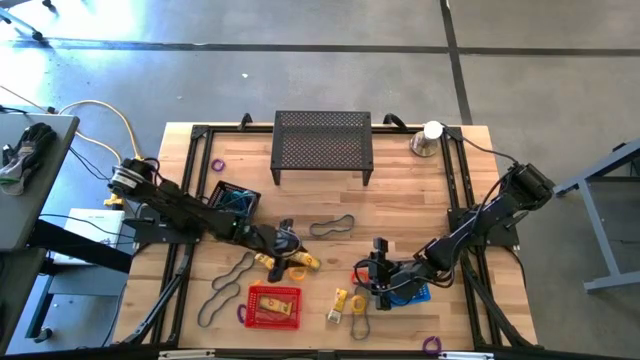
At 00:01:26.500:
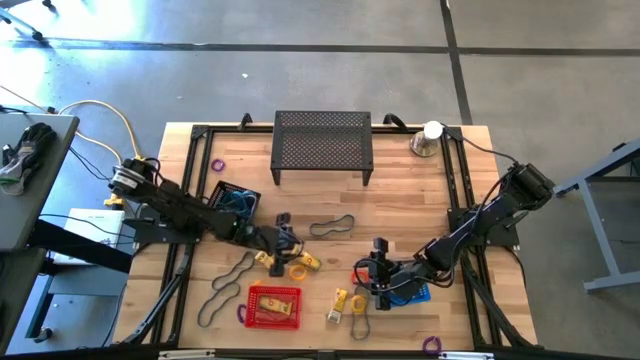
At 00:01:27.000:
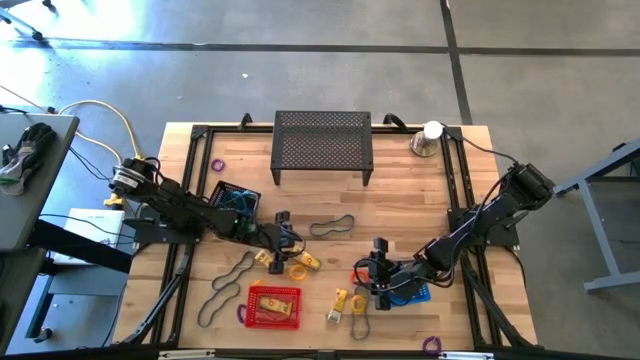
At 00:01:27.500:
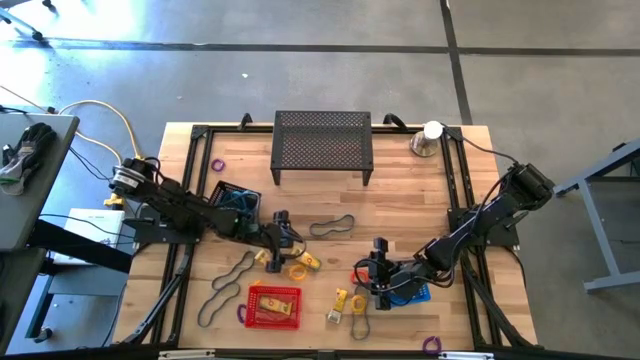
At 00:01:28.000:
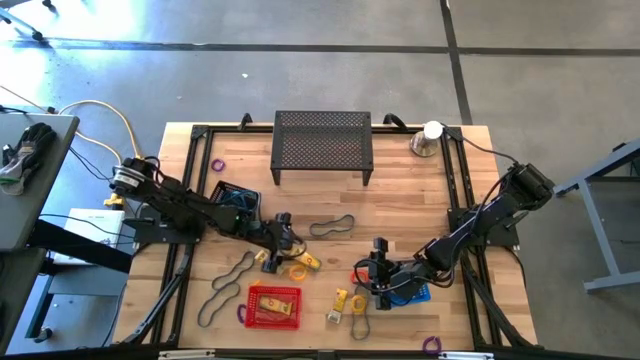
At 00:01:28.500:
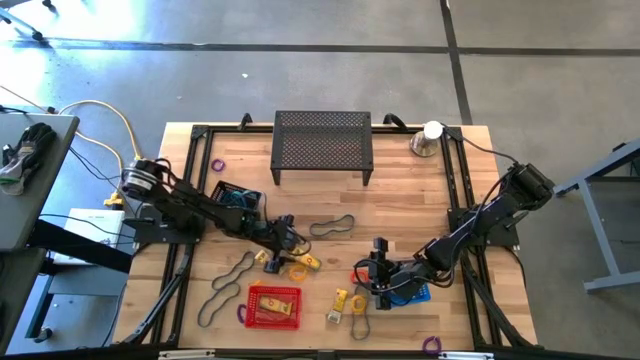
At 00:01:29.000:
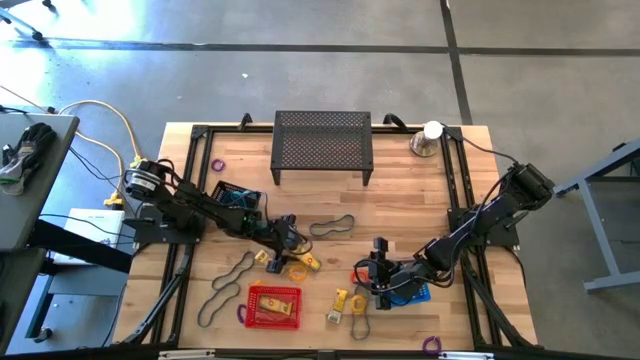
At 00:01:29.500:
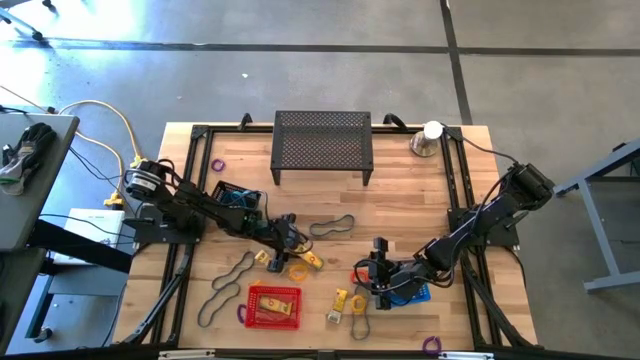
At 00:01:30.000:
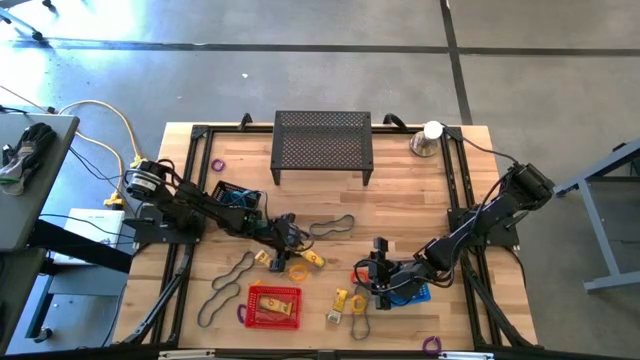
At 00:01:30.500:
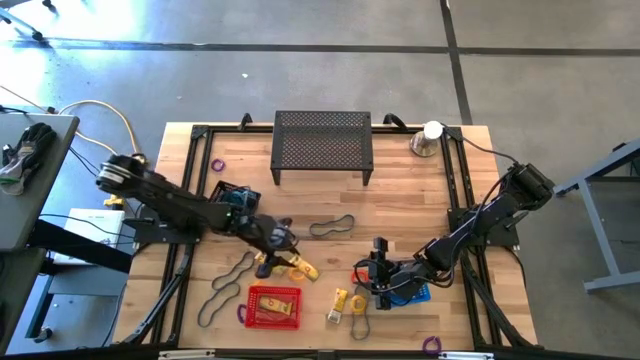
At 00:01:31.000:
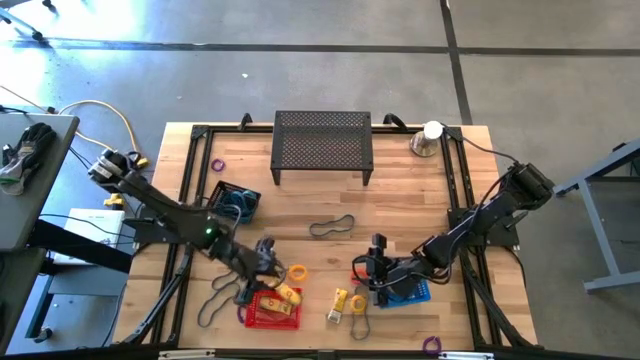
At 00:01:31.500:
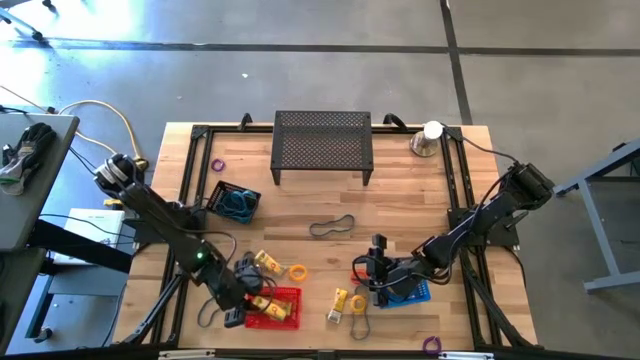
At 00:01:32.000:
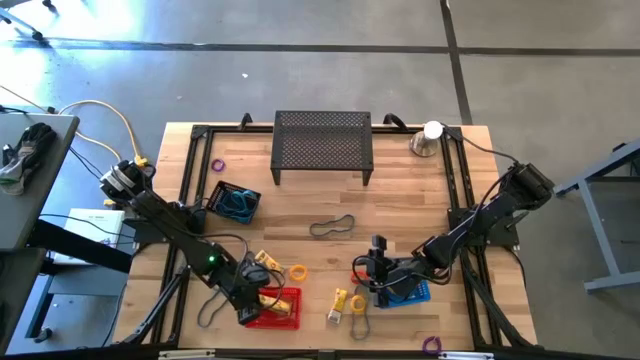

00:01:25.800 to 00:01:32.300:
Task: Pick & Place Office Desk Supplies
Put the yellow crayon box into the red bin

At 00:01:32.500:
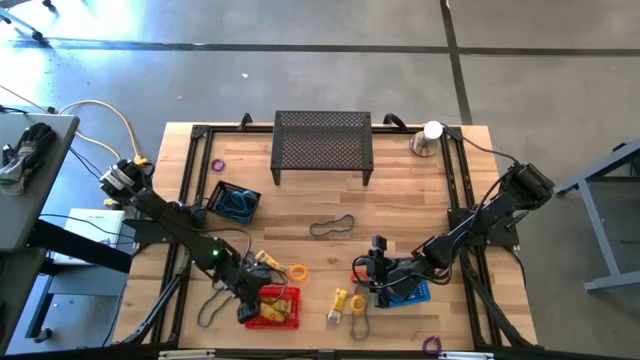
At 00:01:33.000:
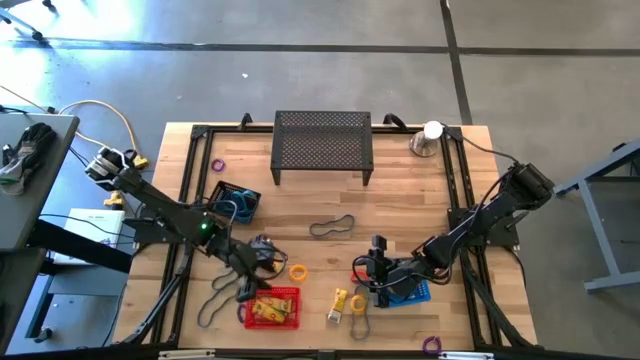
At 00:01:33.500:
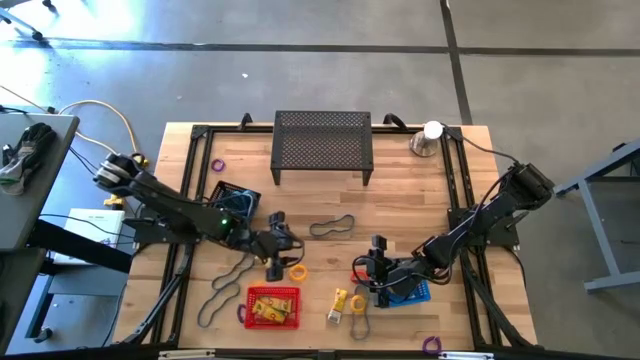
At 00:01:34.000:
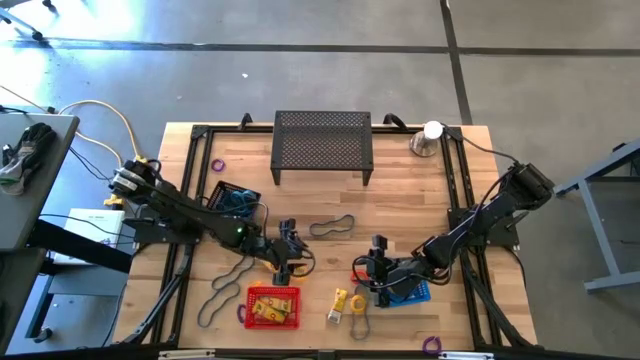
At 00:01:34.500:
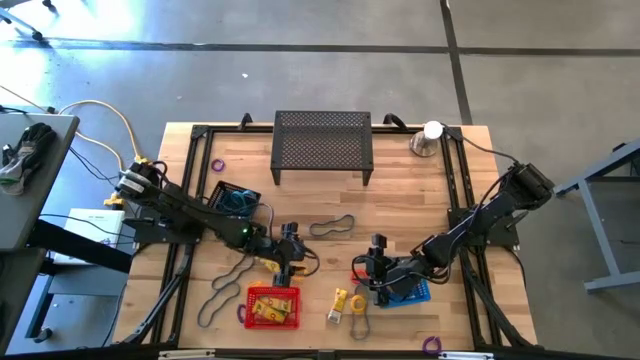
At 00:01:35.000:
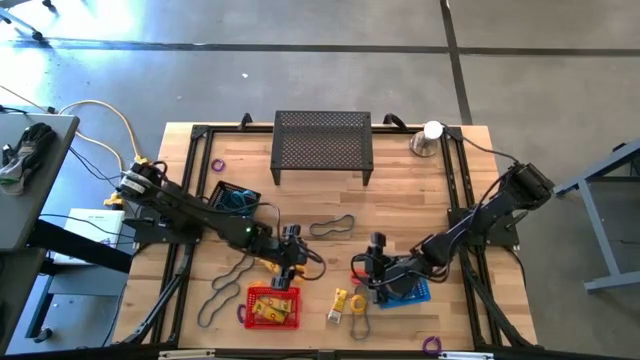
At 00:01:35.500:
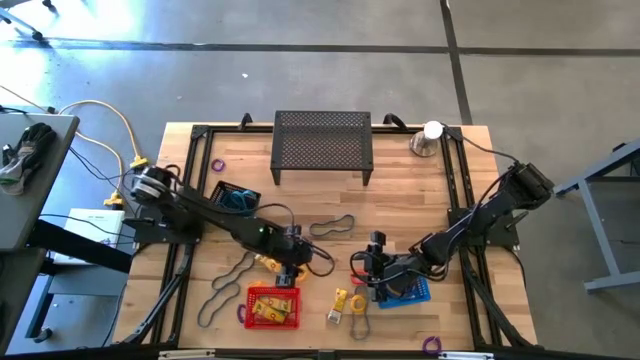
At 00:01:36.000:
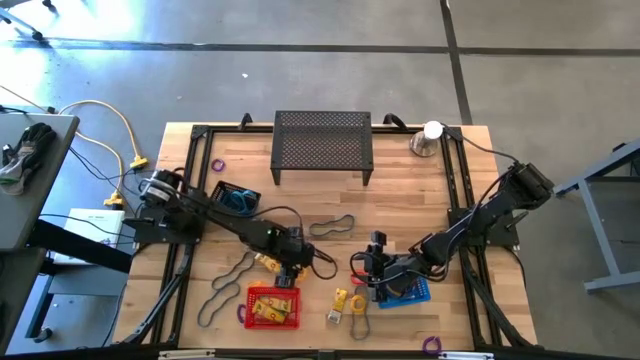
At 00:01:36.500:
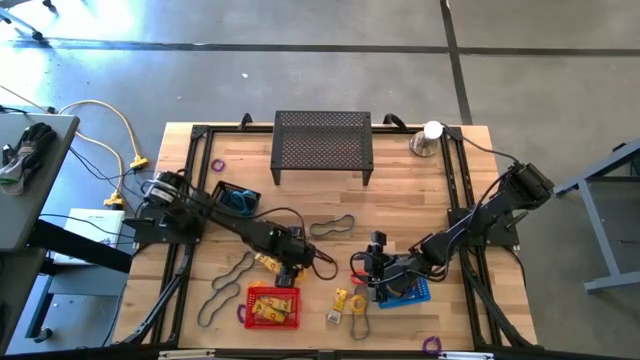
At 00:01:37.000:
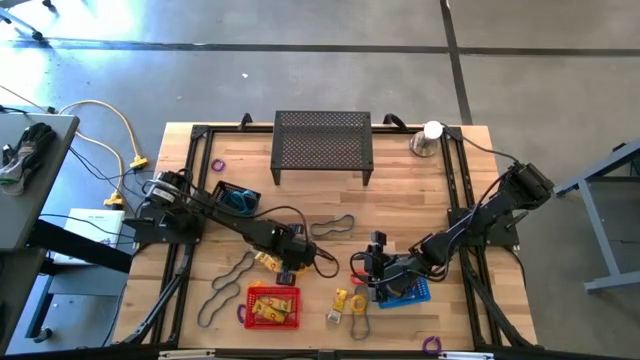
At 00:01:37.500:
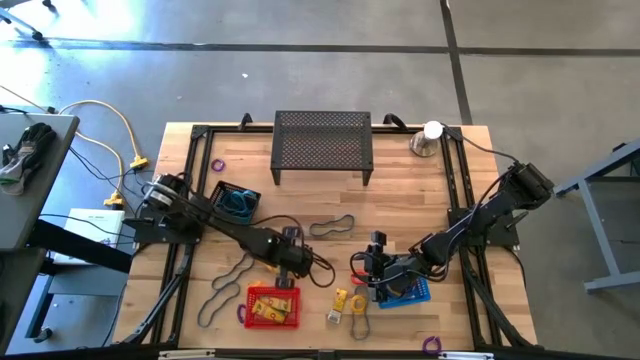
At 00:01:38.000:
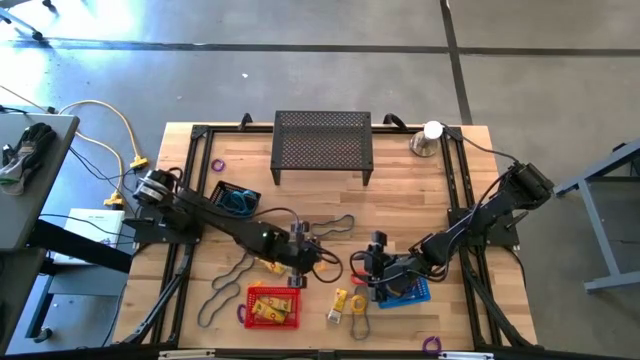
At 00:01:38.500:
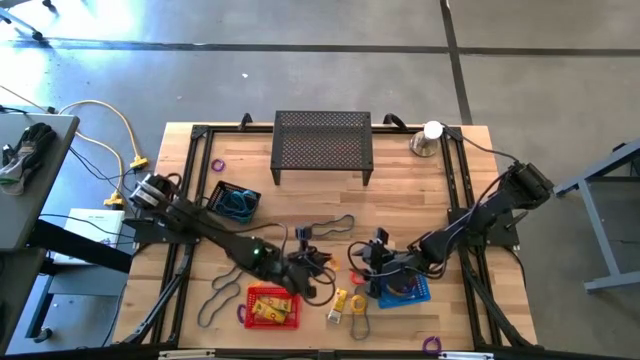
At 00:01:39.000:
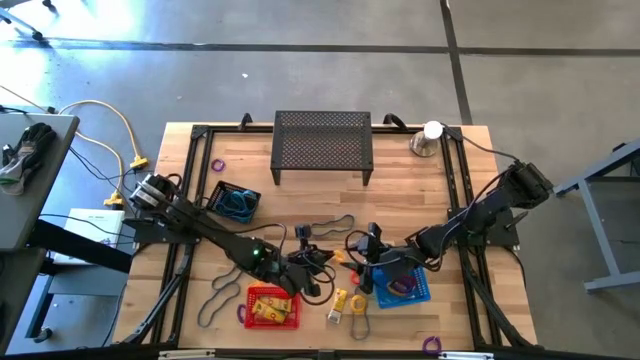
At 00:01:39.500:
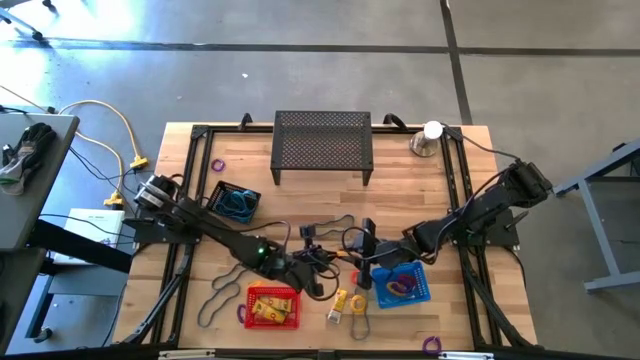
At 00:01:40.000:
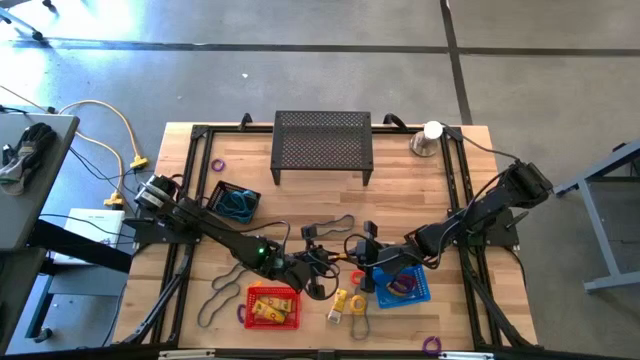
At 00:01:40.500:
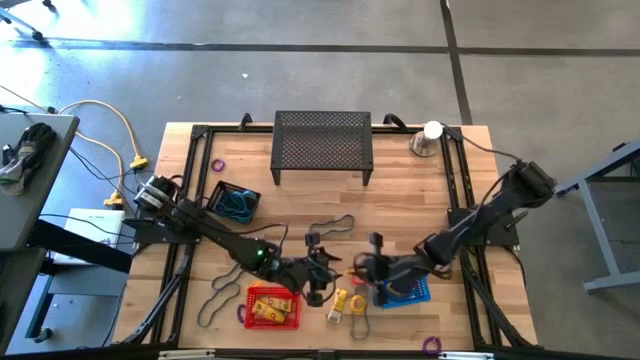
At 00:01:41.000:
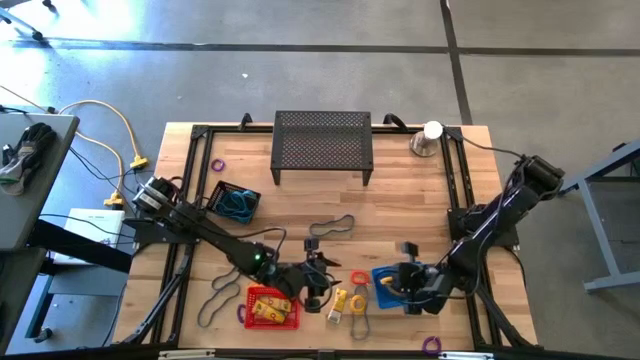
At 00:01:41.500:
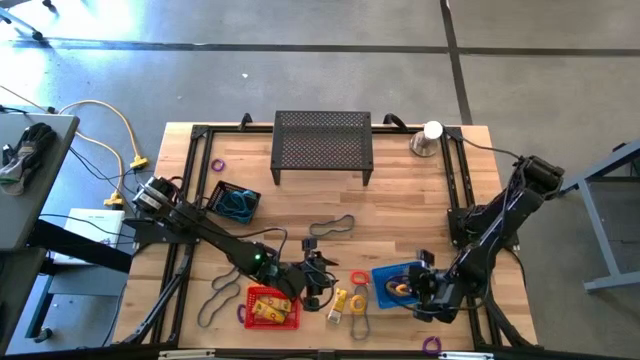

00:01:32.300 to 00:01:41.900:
Put the yellow spring keychain into the blue bin

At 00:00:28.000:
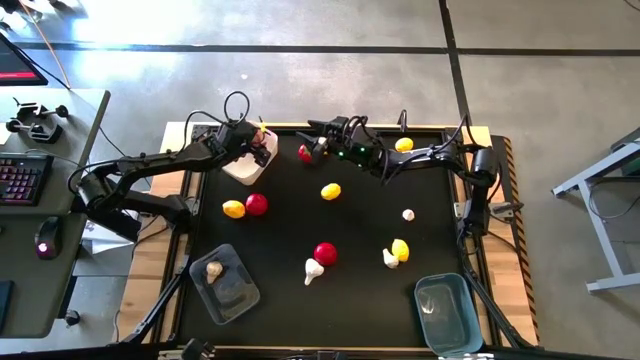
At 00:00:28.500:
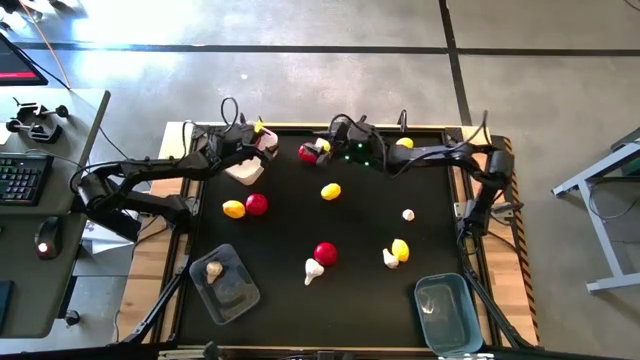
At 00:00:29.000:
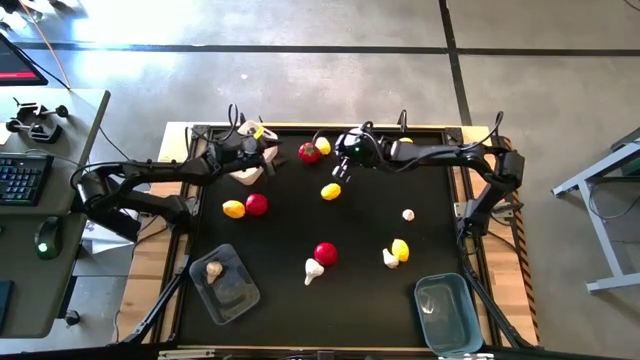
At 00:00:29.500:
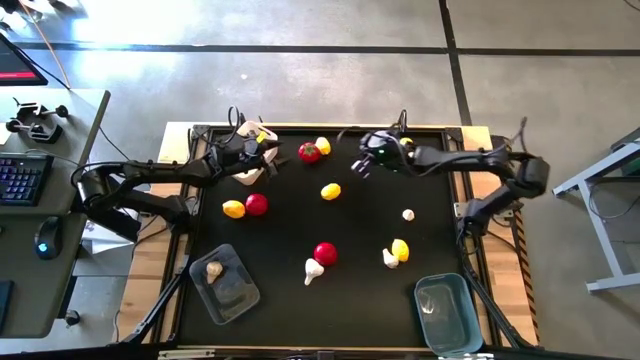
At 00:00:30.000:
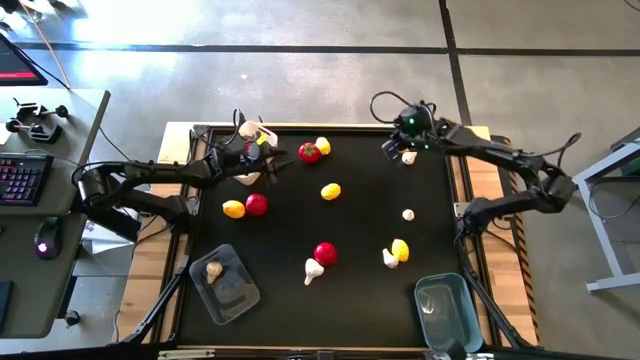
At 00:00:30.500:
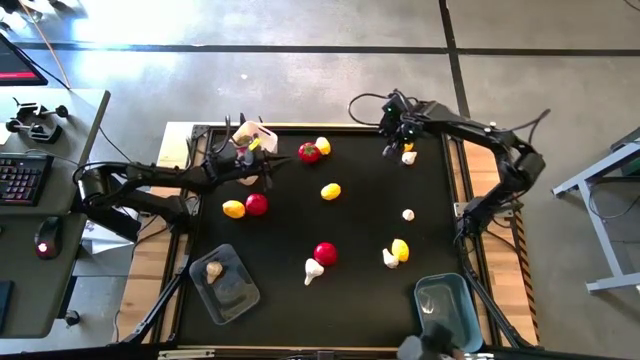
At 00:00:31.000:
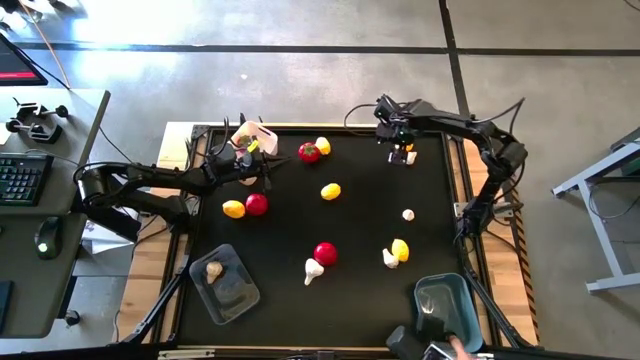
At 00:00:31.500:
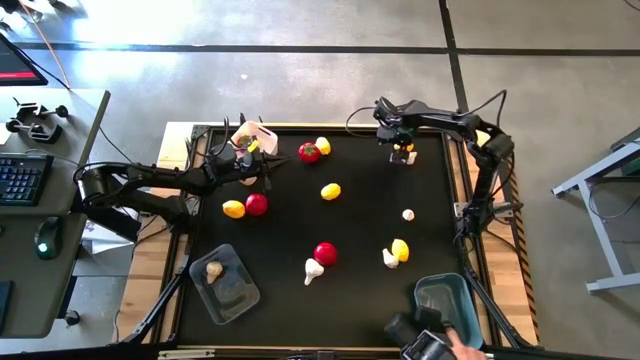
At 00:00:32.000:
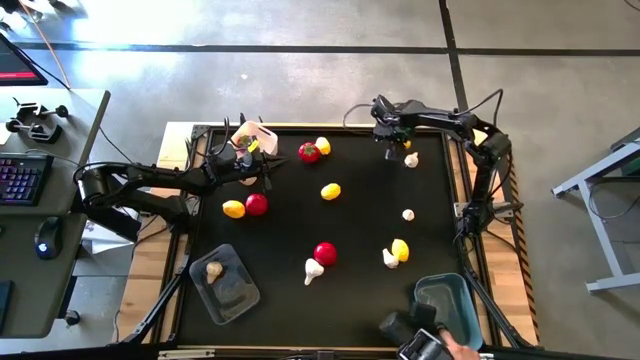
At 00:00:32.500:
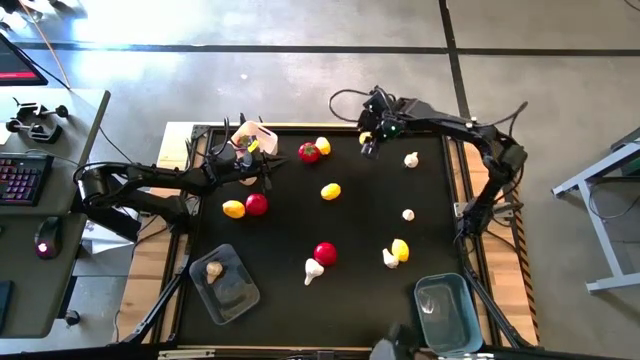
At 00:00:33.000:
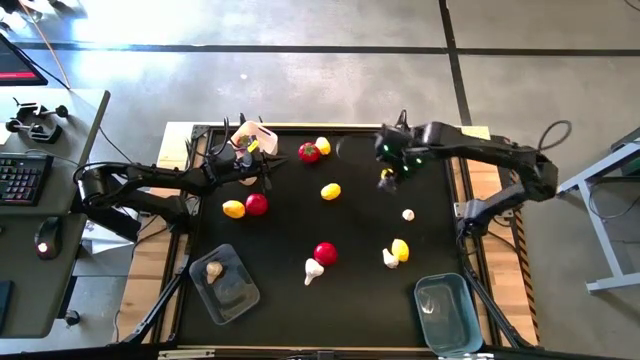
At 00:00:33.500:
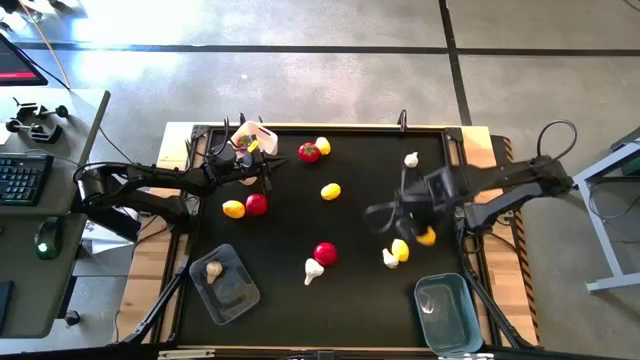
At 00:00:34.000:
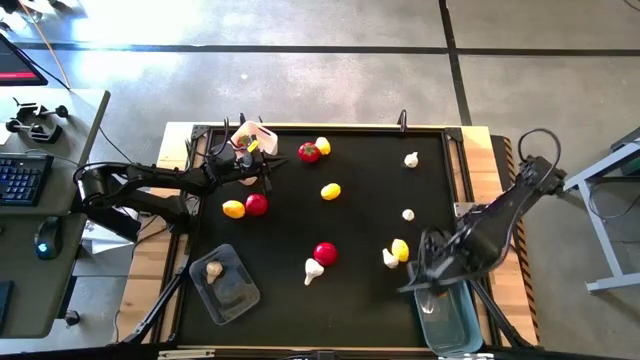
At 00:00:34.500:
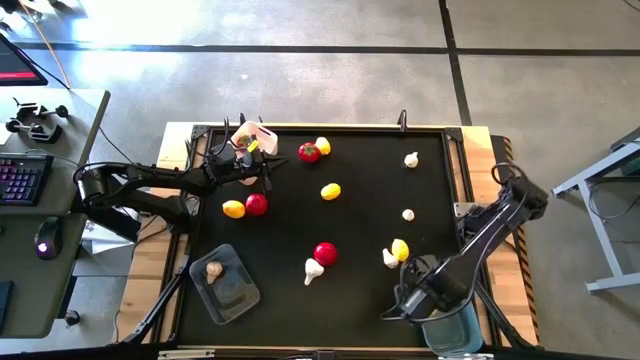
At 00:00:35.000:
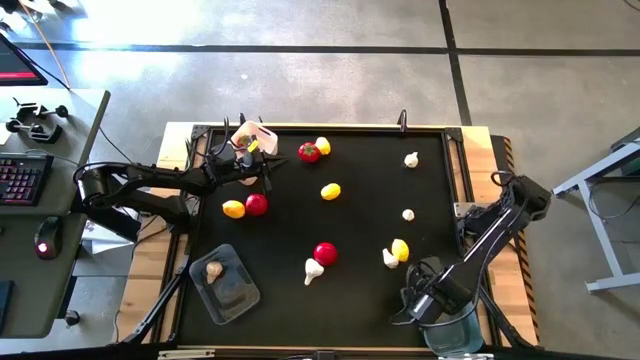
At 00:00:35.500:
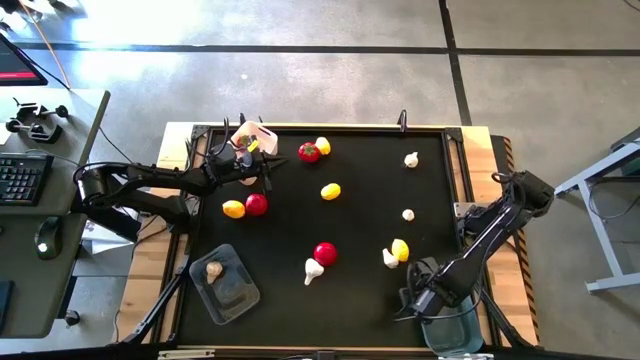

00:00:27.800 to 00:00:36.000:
Task: Sort produce into baskets
Put the yellow lemon into the blue bin
